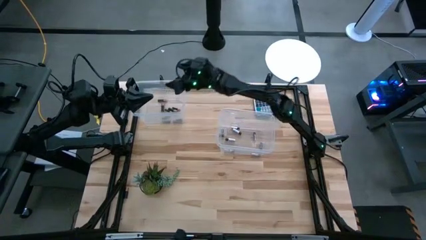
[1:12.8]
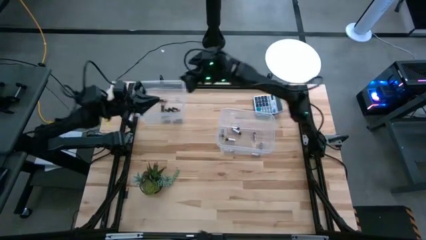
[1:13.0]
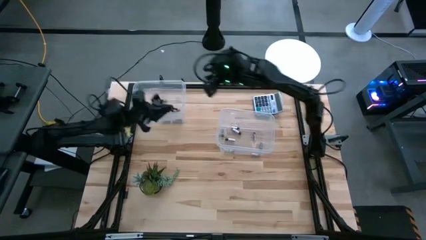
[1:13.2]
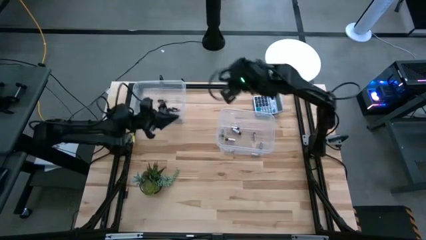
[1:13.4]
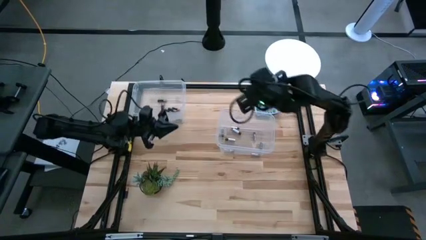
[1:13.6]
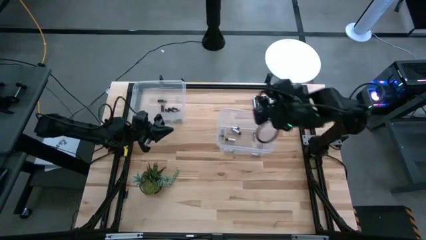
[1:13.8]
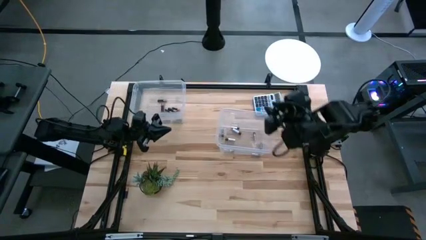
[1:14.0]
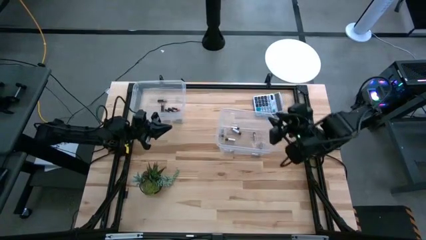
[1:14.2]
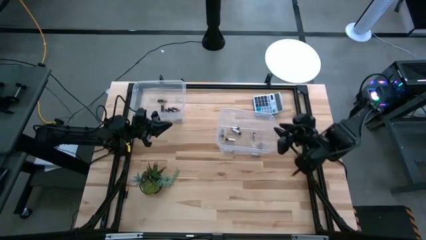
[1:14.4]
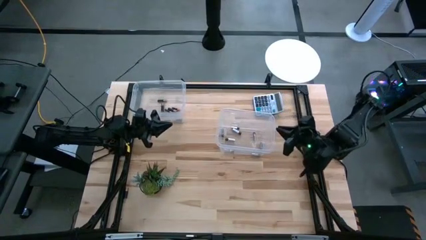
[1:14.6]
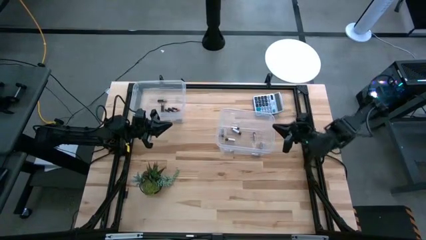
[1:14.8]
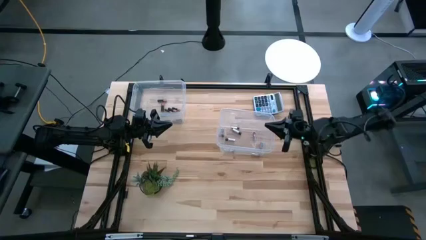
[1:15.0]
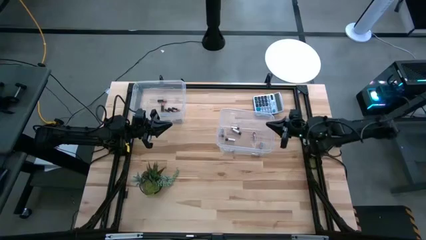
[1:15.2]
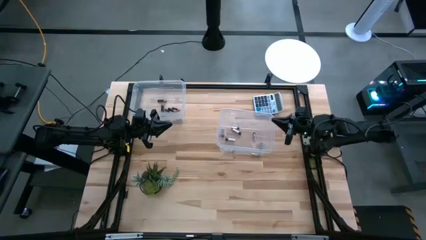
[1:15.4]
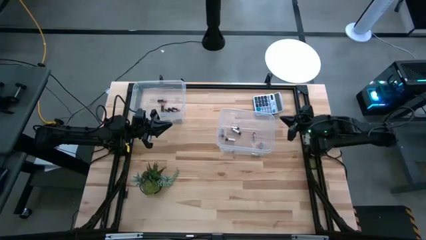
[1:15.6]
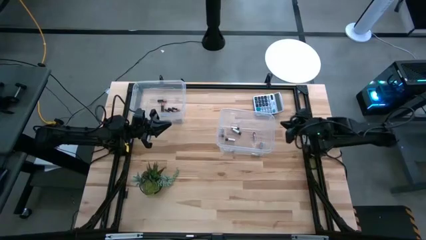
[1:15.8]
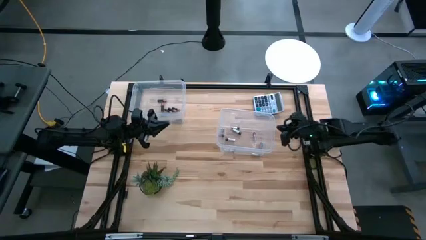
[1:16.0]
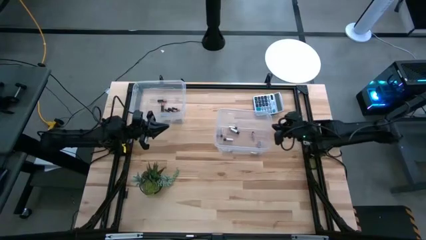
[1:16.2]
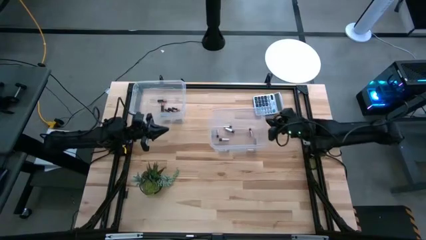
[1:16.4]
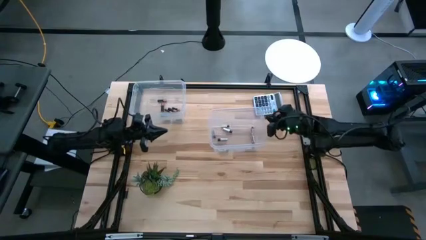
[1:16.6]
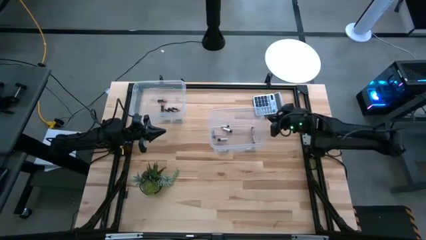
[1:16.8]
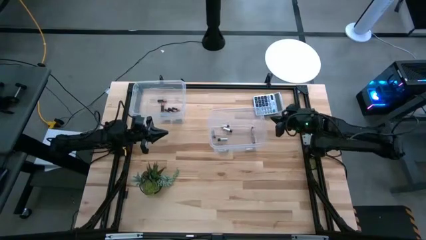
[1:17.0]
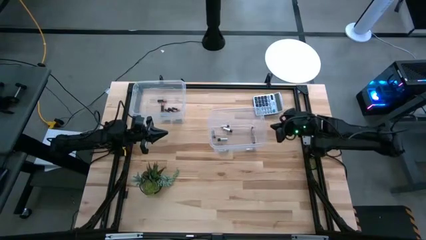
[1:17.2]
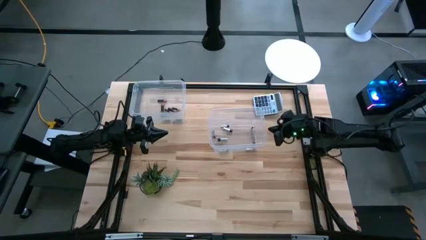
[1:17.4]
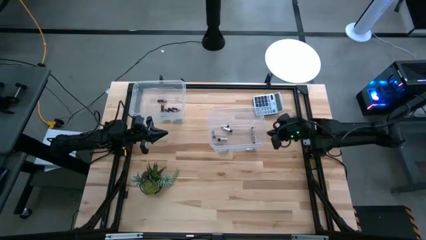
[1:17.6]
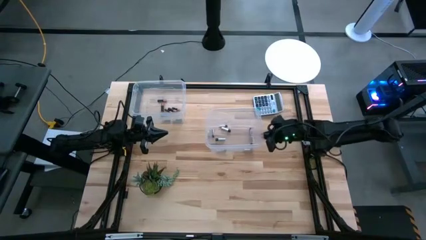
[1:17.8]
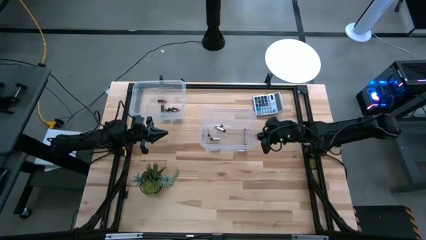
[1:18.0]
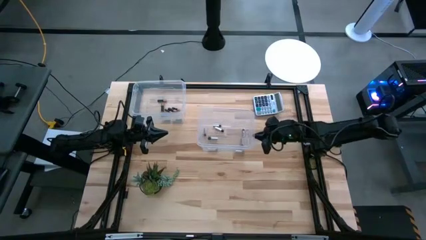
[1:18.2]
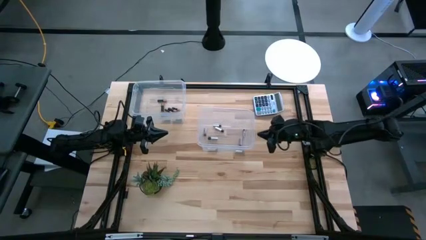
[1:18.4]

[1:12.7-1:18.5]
Task: Sort batteries
Adjust the bottom transparent bin

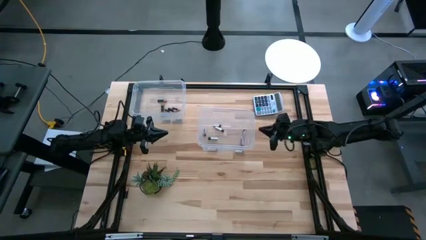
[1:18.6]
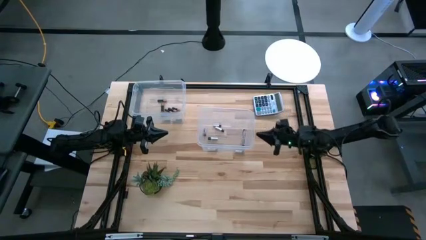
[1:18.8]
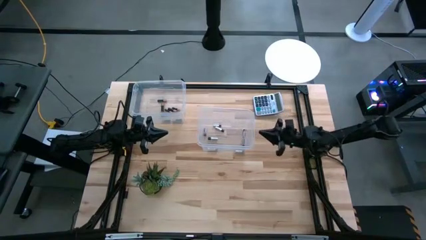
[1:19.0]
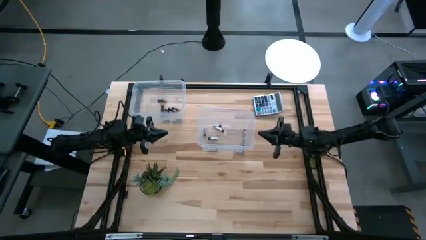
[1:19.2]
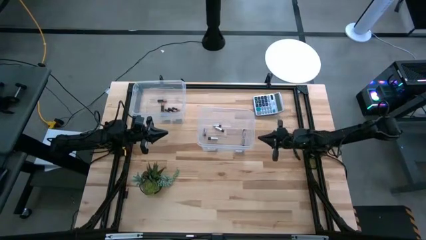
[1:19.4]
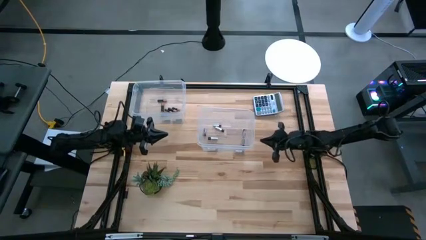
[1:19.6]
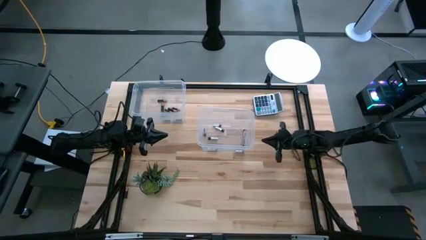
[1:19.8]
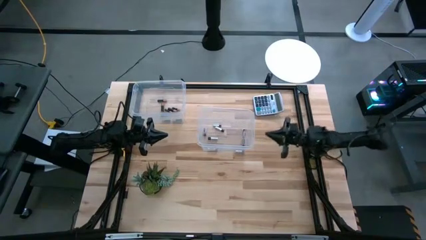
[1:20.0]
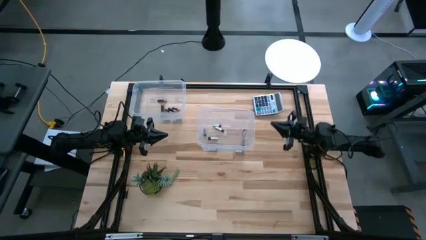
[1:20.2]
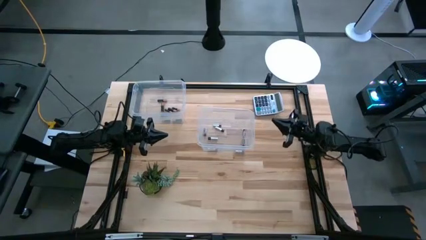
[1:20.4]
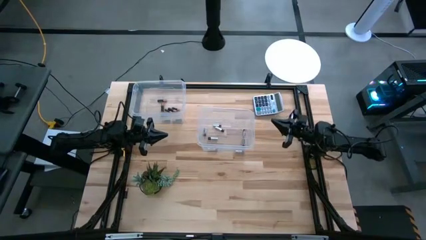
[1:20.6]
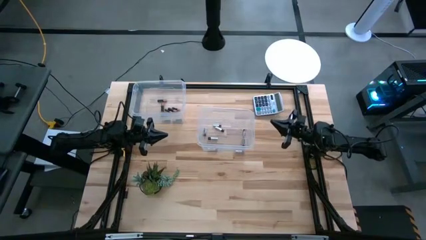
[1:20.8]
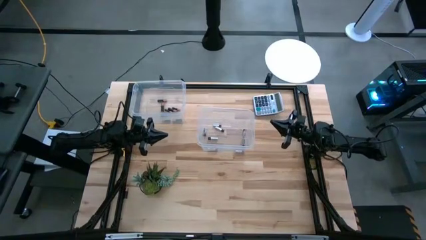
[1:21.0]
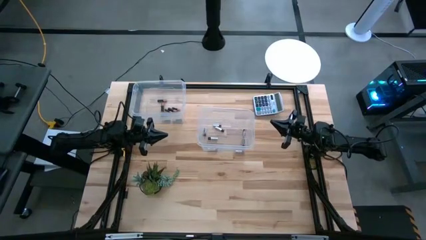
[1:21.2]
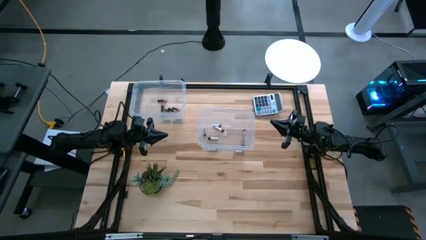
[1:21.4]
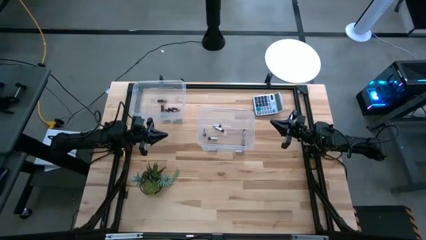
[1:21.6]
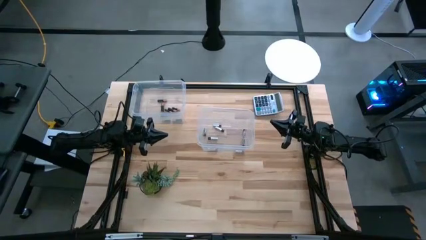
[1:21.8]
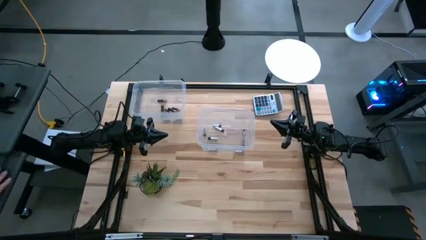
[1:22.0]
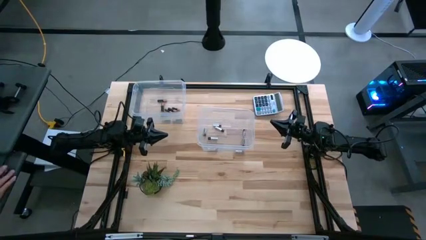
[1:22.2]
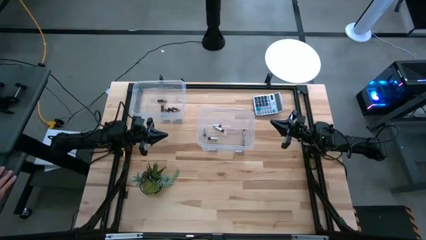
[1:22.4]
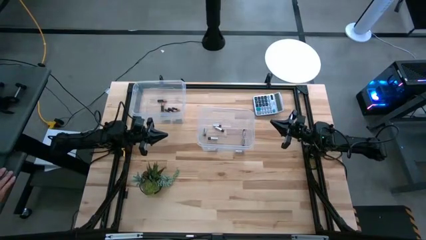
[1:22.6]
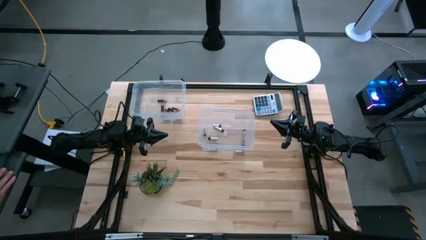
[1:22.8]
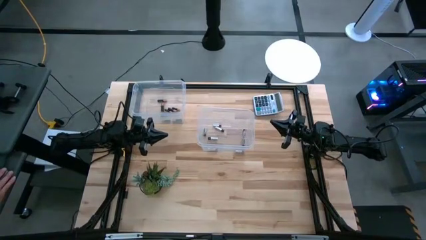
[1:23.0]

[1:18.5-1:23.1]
Return to Home Position

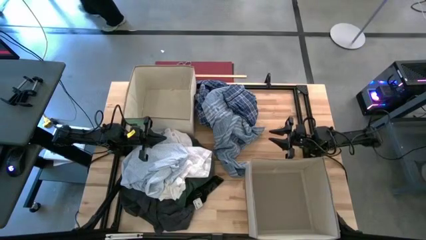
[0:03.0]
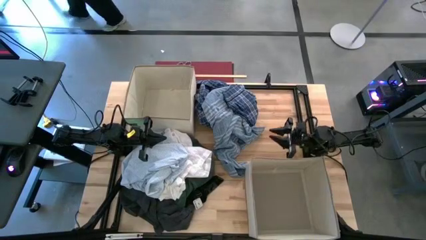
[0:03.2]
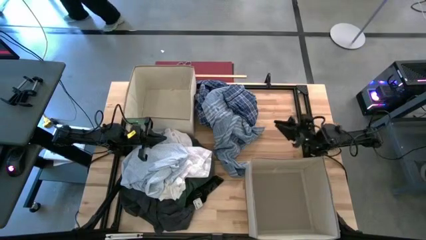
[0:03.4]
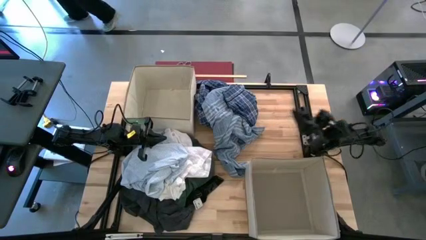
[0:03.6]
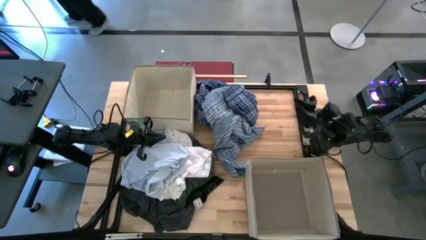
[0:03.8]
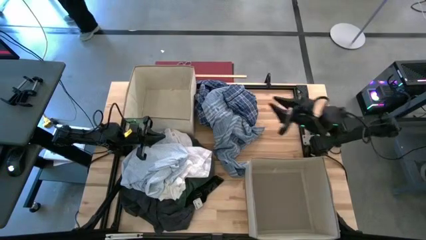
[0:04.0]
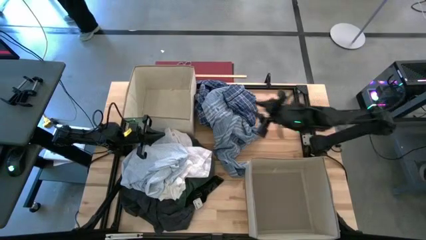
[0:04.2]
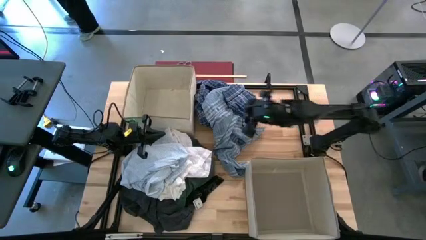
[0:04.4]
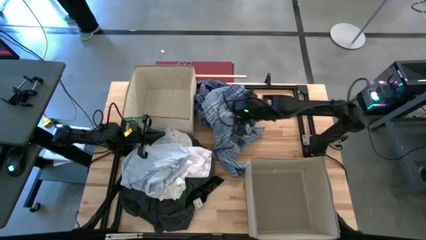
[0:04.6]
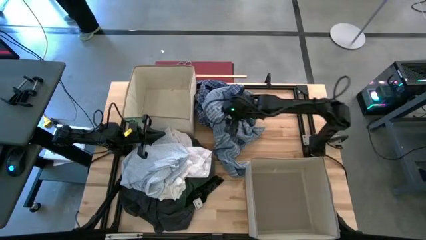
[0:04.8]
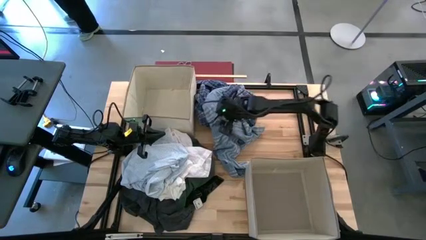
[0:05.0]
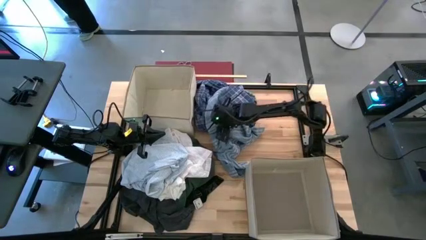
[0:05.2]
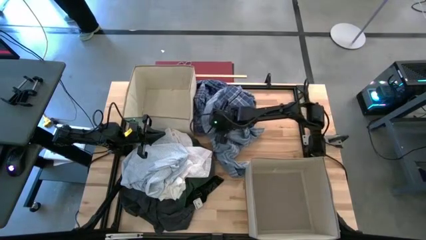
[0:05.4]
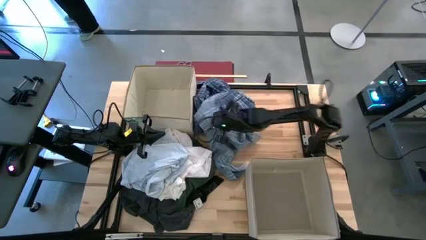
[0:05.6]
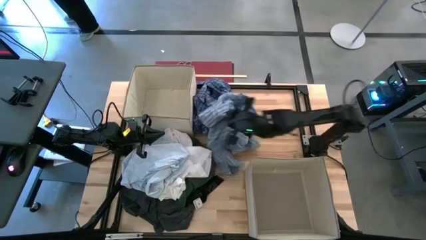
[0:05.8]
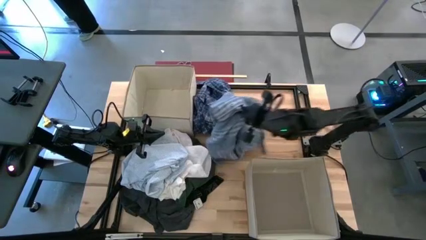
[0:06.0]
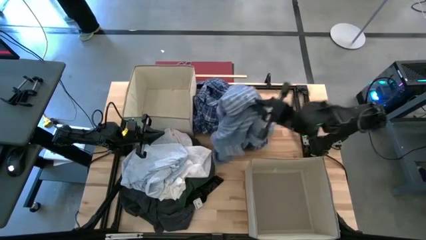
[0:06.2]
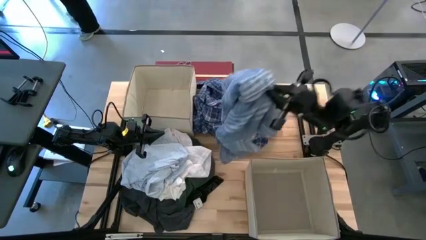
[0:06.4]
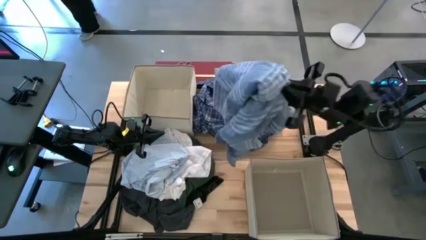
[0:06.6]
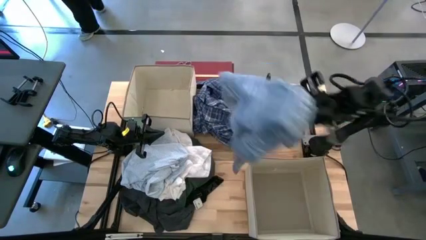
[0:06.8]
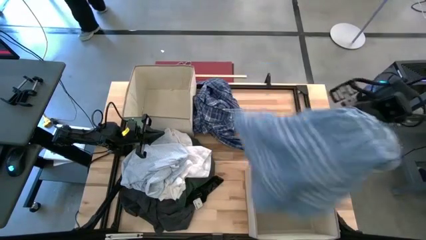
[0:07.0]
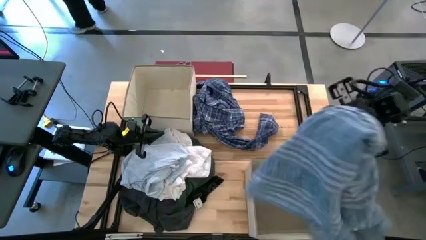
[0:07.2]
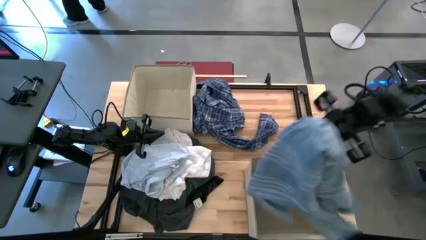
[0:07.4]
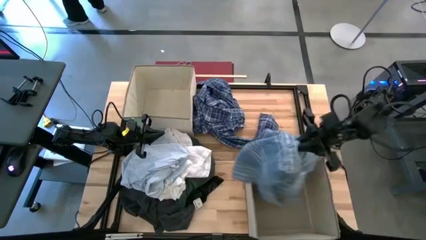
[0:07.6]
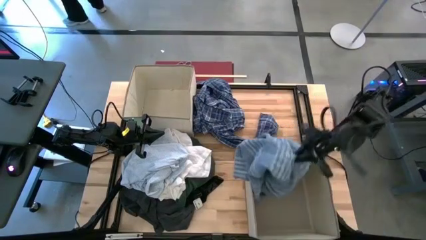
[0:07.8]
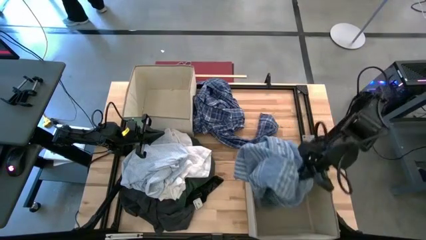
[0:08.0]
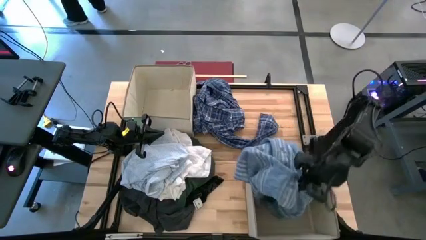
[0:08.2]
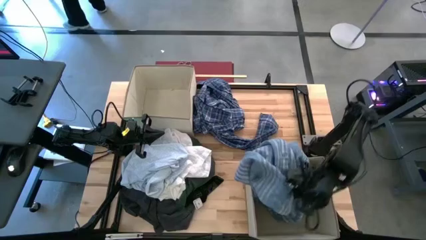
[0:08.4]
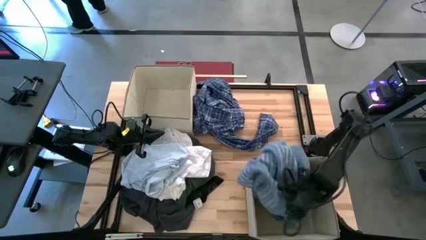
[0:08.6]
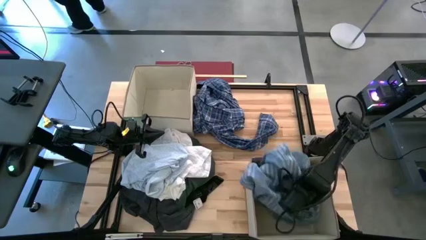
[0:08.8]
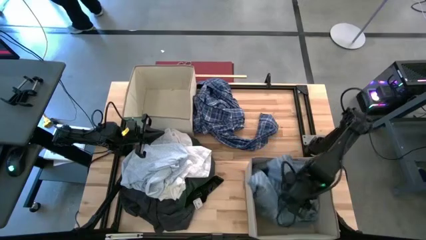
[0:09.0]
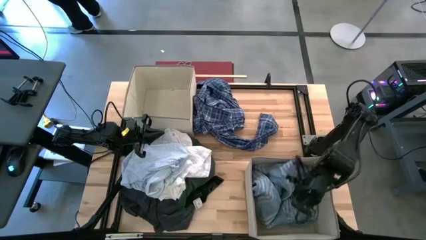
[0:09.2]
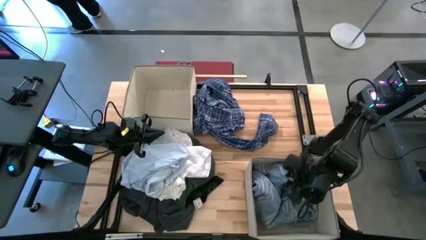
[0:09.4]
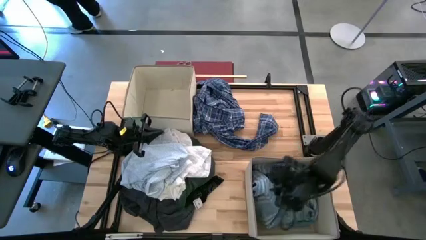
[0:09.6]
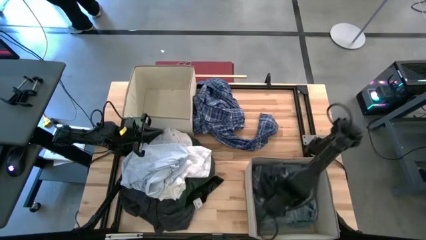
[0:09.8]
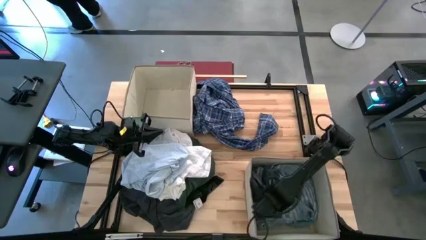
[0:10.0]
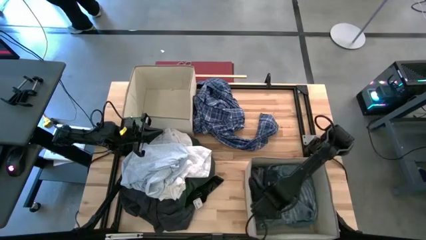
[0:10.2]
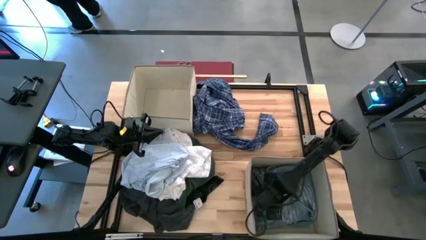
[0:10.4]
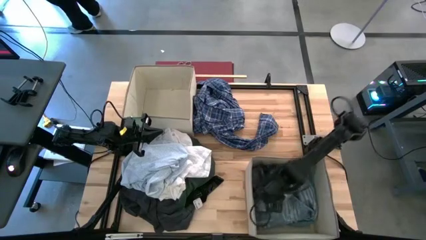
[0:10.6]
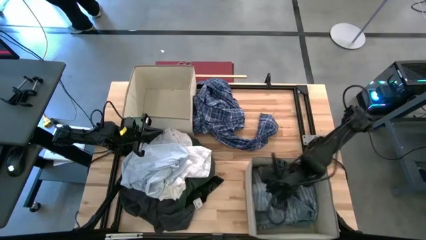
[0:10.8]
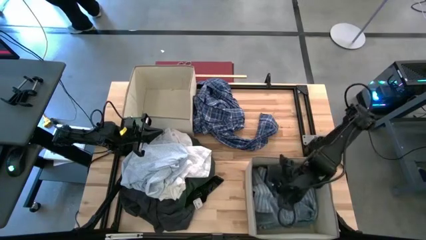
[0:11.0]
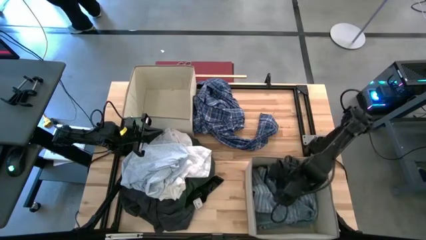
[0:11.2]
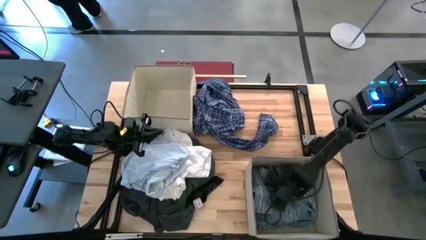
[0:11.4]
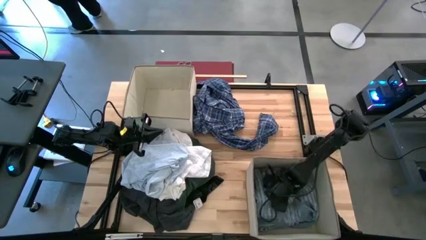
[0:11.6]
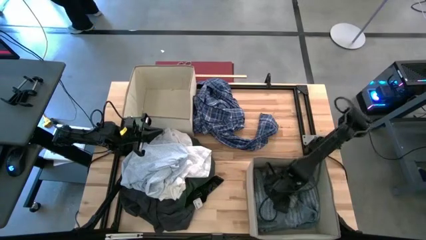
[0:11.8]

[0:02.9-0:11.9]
Task: Sort clothes
Put the light blue polo shirt into the bottom laundry bin
